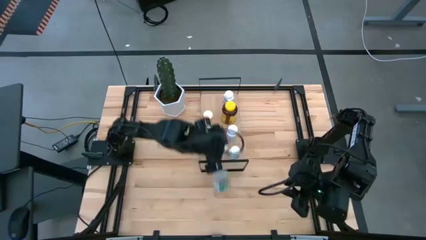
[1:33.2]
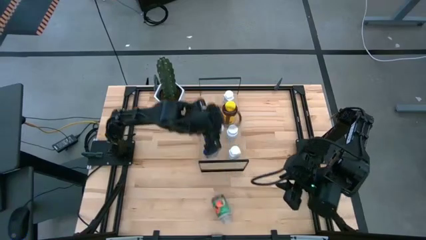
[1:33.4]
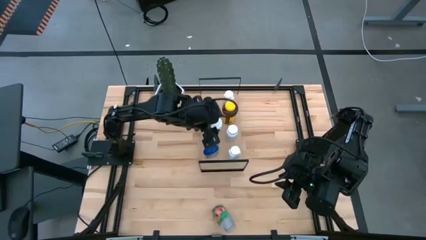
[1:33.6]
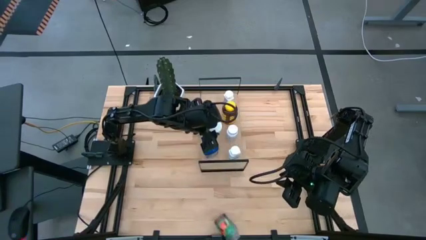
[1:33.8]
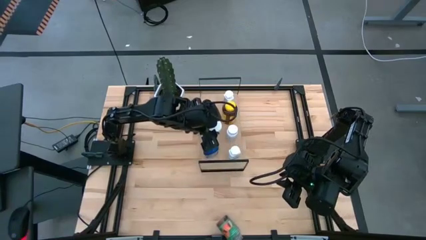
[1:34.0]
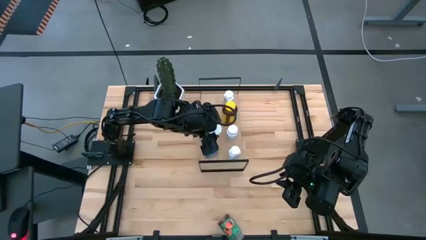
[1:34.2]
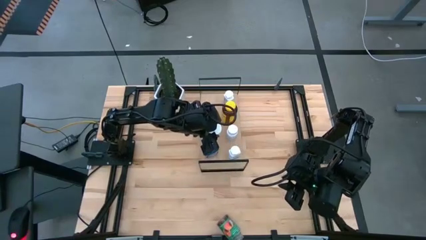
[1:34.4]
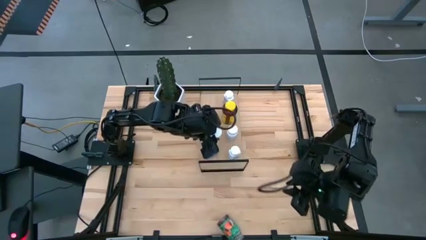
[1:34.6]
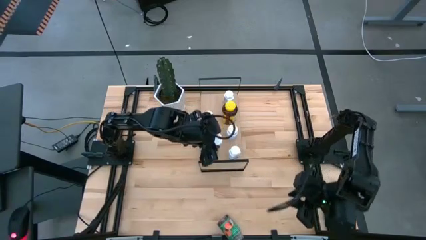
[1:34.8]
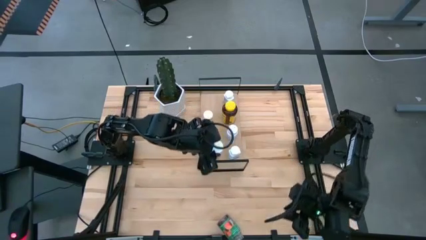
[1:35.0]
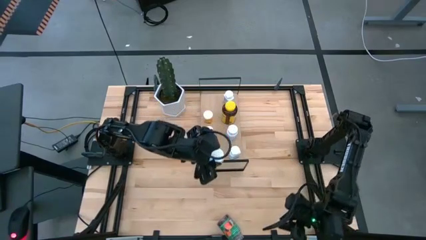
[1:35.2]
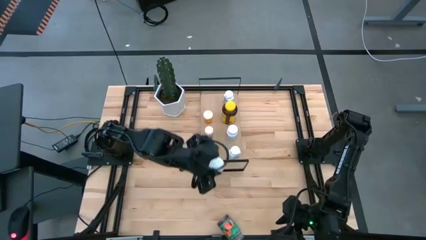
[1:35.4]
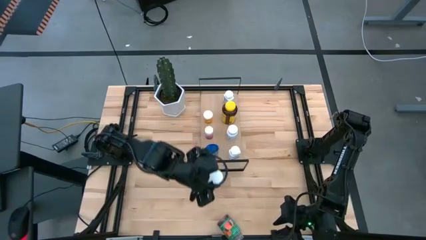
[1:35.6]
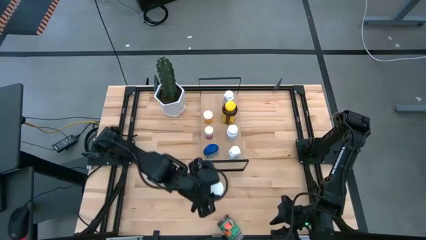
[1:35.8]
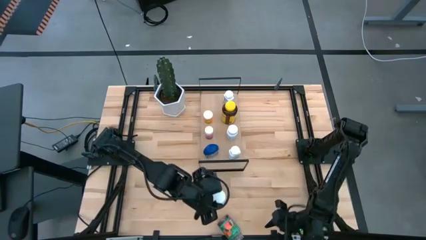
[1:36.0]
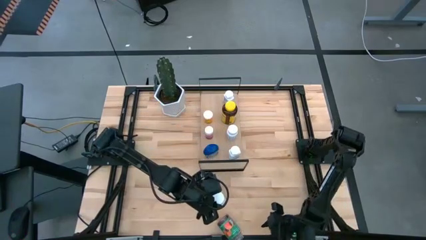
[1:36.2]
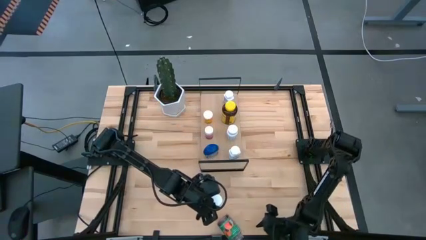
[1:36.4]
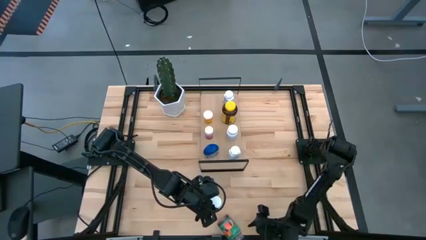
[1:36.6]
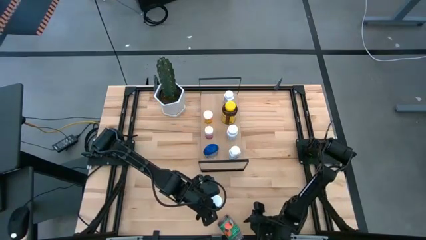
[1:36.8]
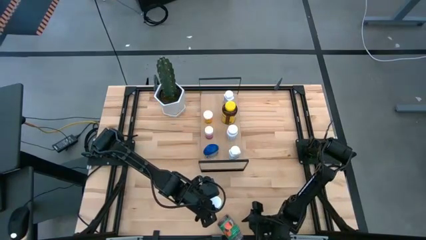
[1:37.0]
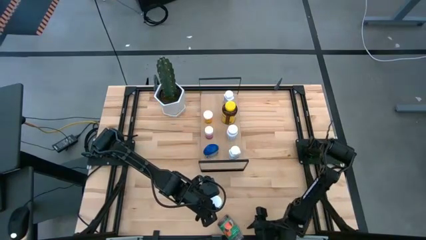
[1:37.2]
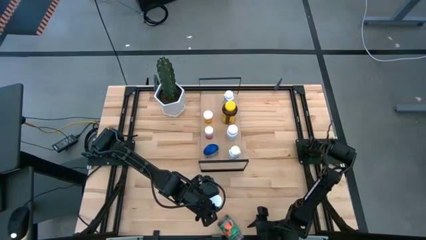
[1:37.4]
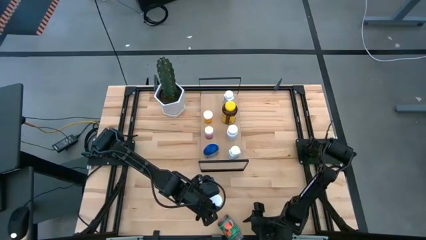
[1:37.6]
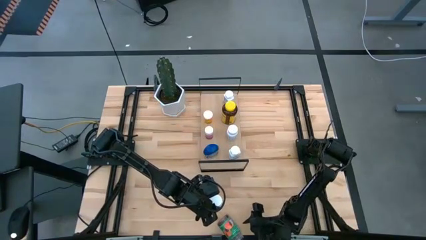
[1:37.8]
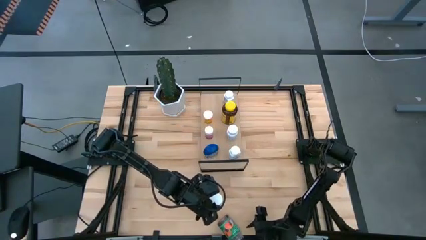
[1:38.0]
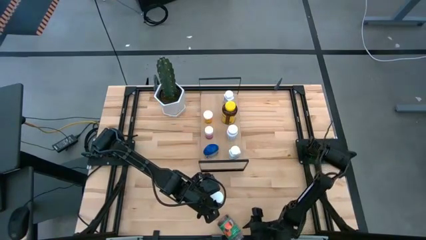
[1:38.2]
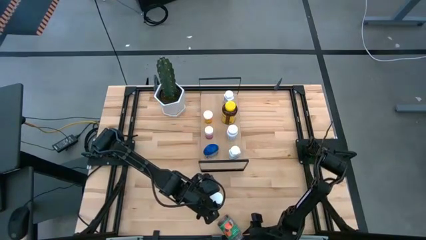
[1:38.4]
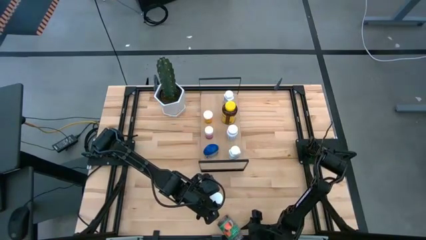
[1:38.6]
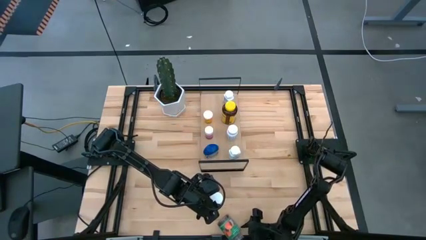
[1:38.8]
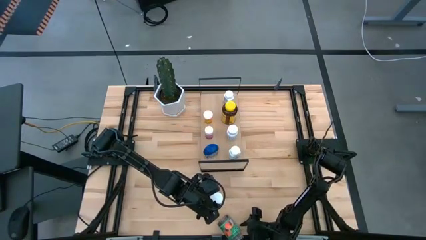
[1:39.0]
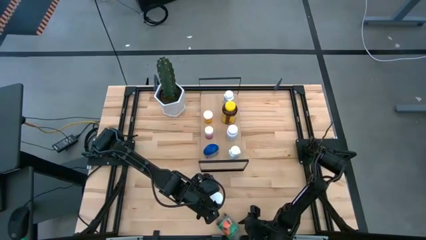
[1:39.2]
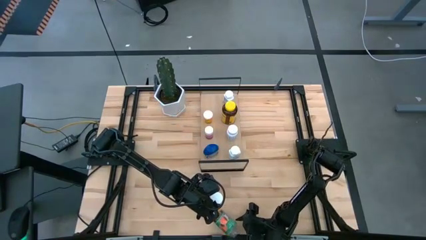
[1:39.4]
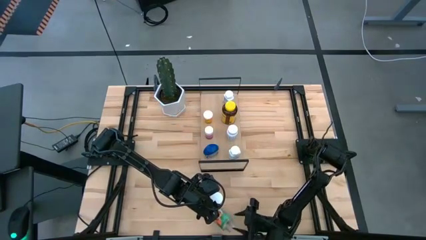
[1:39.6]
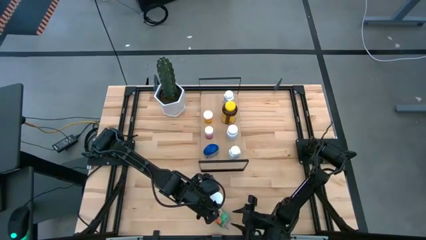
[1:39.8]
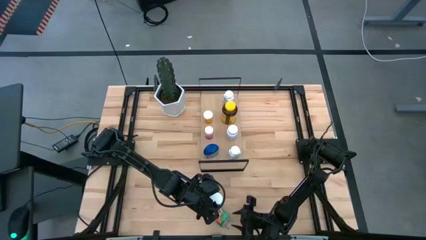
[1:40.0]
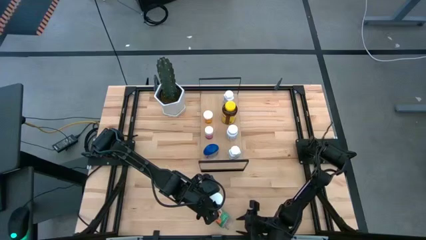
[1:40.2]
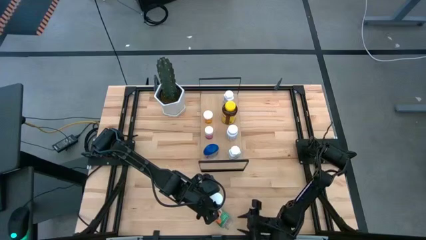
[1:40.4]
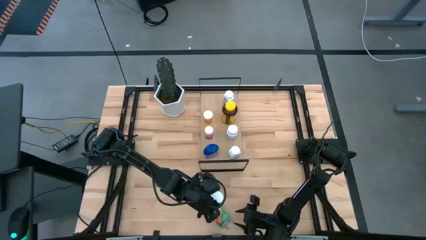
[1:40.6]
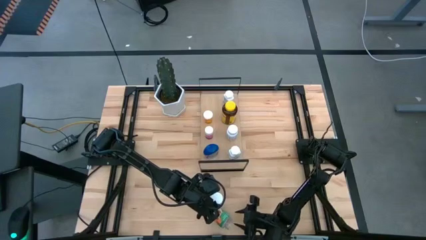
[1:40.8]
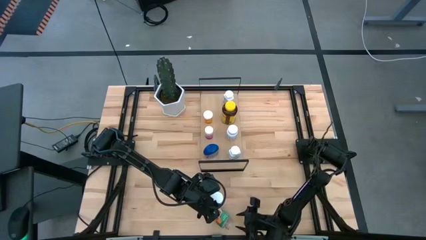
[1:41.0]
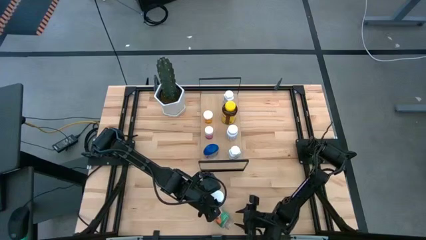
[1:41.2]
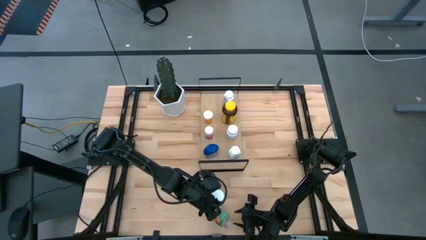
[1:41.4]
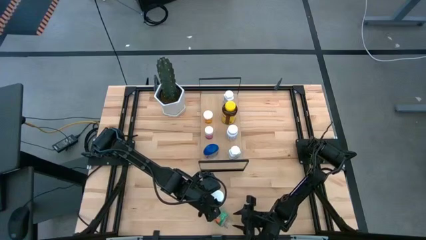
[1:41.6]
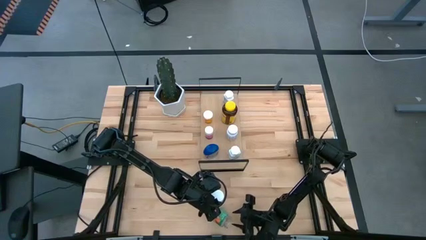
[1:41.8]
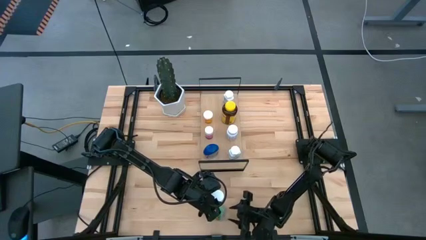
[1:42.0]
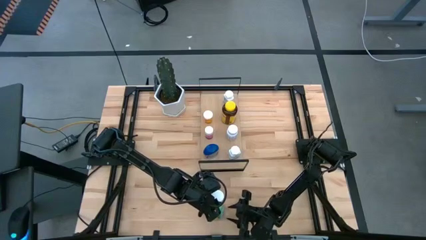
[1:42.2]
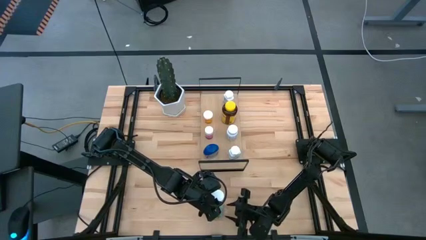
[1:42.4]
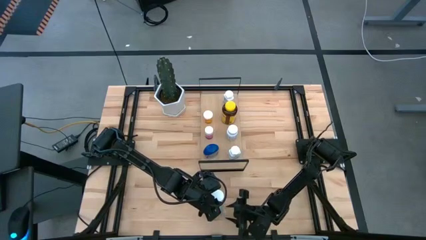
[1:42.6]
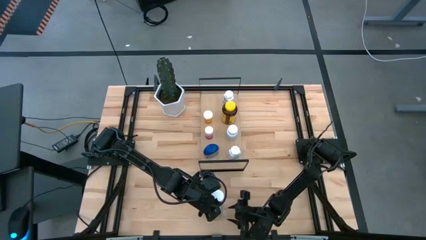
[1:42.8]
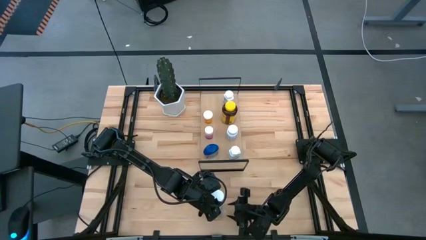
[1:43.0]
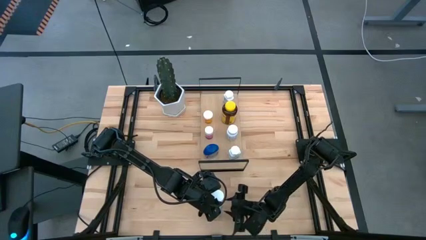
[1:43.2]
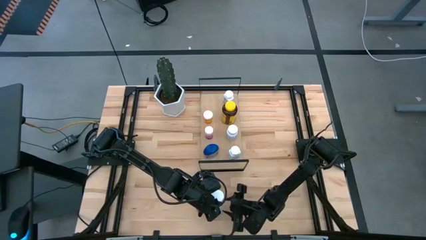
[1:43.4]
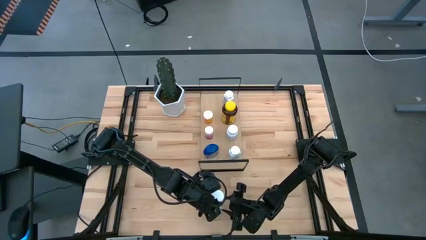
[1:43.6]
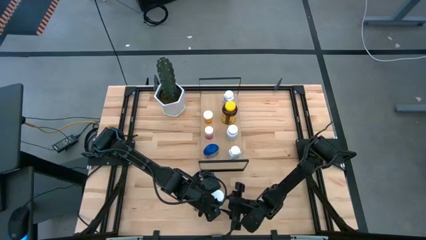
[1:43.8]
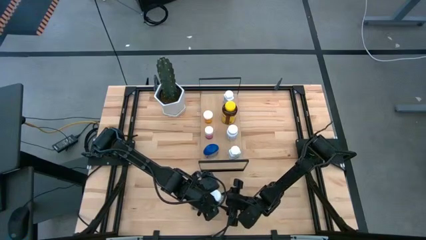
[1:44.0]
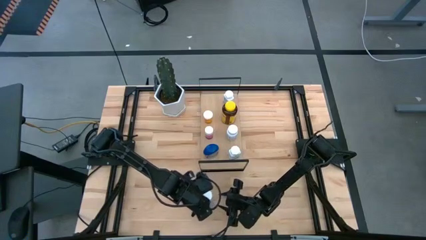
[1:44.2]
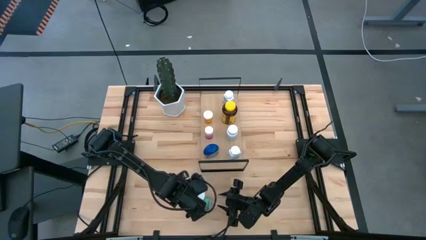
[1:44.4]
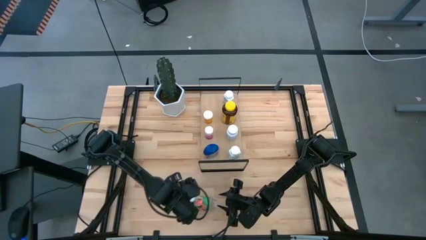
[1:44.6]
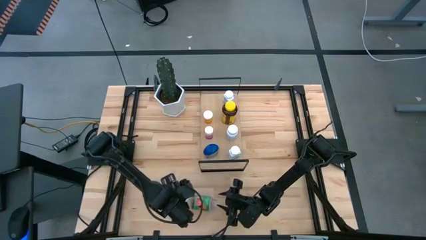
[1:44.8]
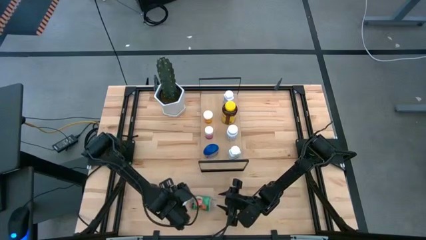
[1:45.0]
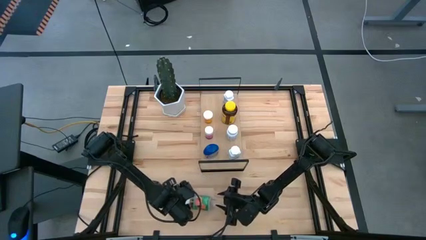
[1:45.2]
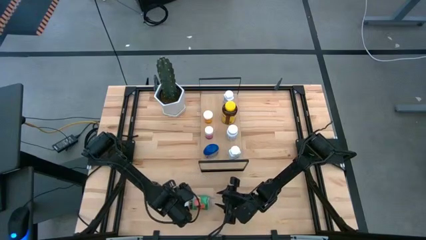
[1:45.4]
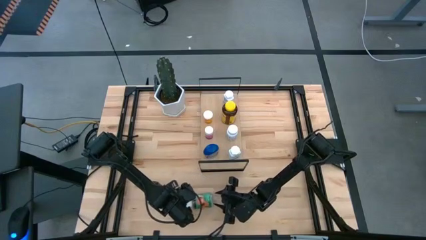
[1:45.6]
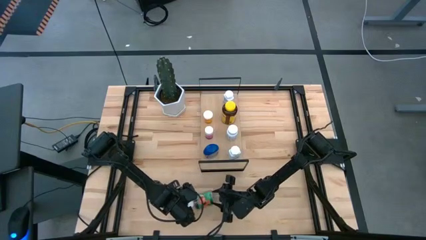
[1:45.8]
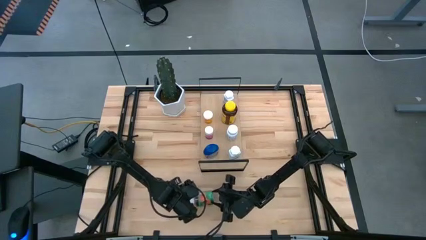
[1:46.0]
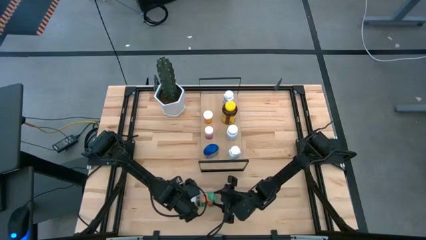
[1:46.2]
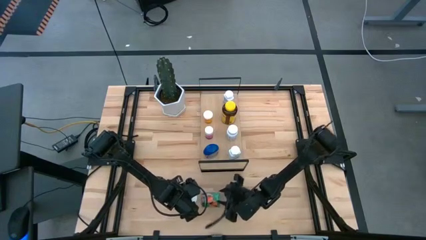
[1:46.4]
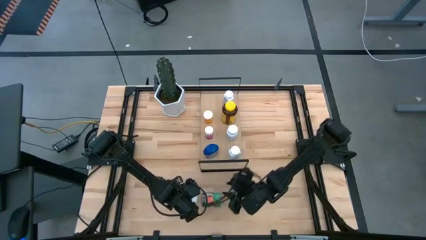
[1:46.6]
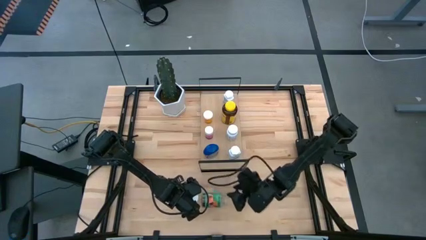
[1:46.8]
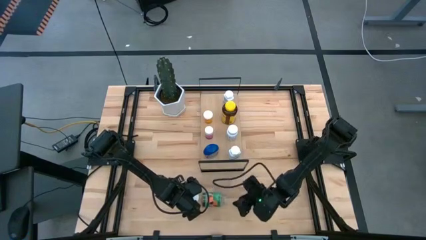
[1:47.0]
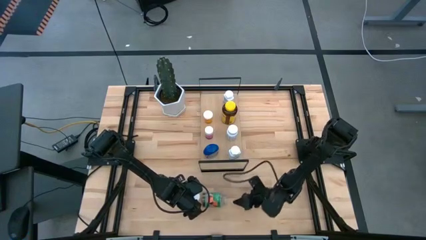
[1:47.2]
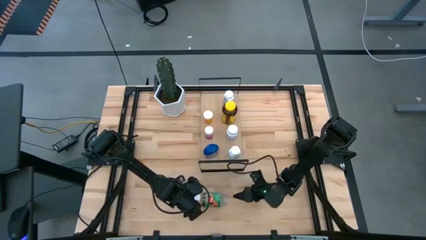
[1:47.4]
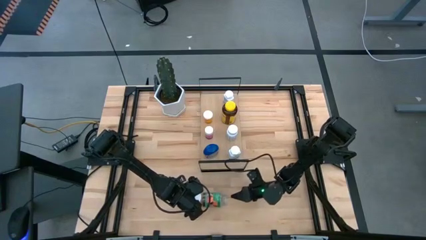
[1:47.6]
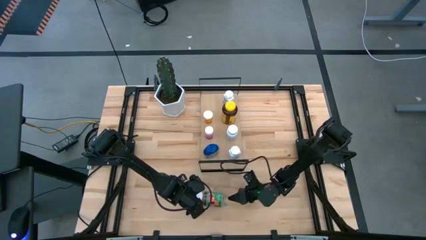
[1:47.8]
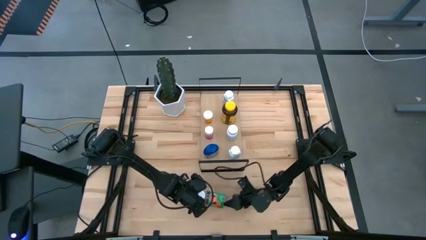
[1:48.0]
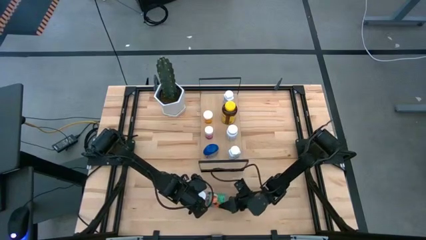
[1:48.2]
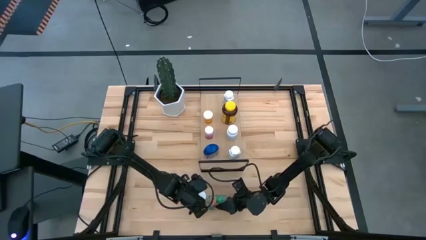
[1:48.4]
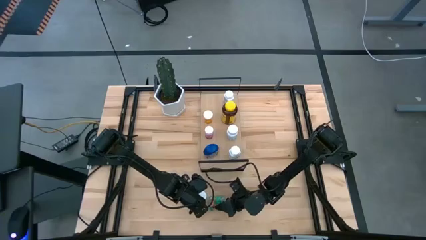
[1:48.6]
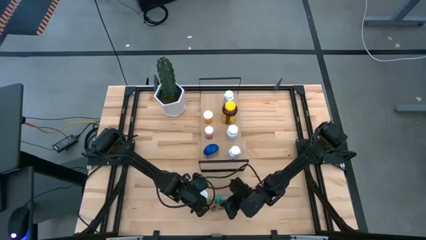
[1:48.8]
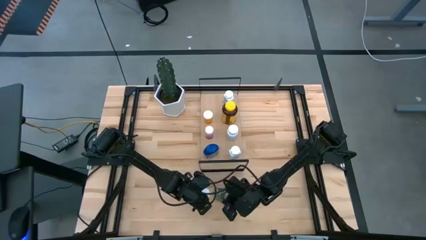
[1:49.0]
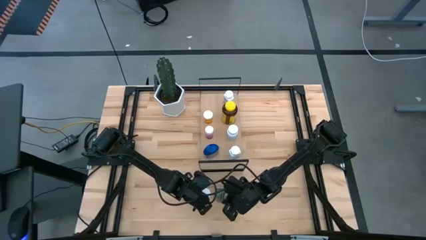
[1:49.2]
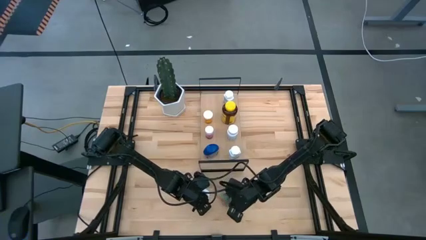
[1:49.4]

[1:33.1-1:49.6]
Task: Pick and place medicine bottles onto shelf by color
Close the lid of the green medicine bottle
